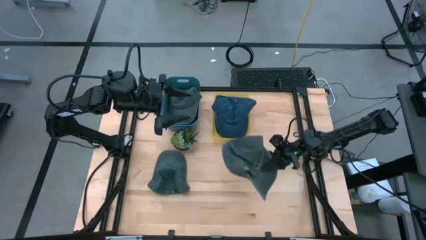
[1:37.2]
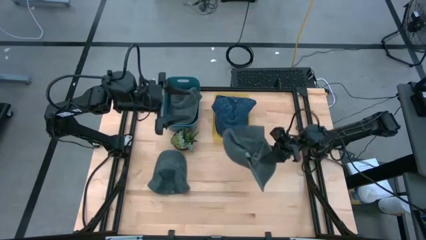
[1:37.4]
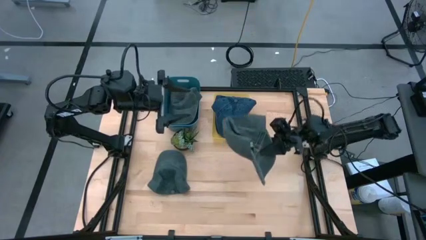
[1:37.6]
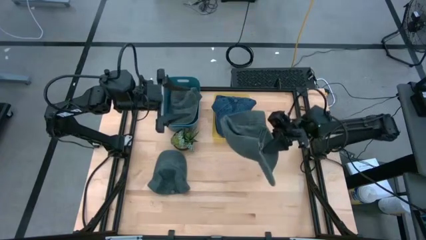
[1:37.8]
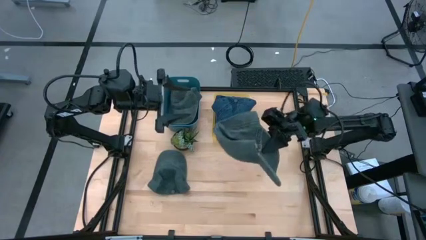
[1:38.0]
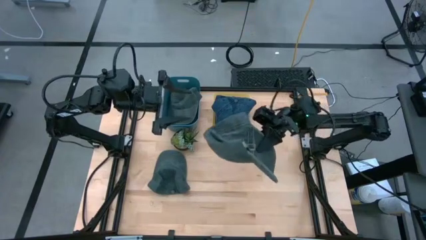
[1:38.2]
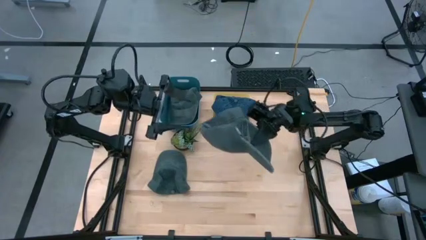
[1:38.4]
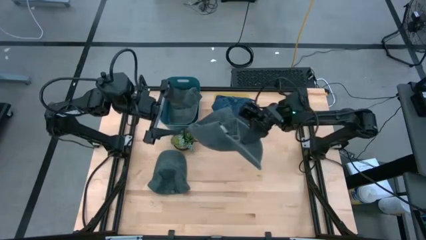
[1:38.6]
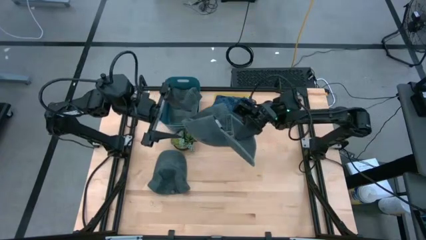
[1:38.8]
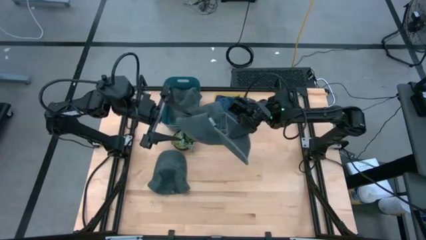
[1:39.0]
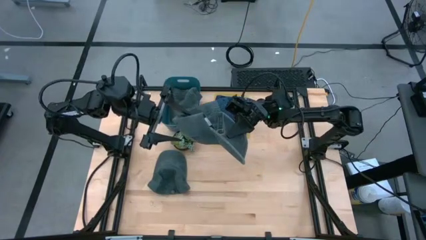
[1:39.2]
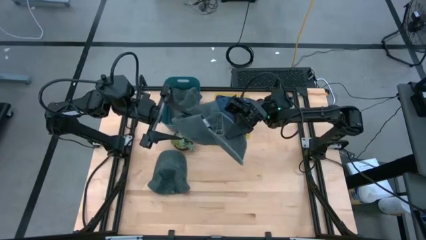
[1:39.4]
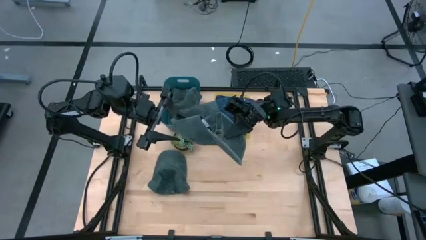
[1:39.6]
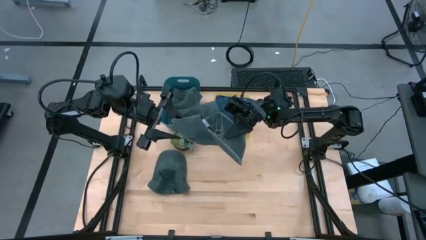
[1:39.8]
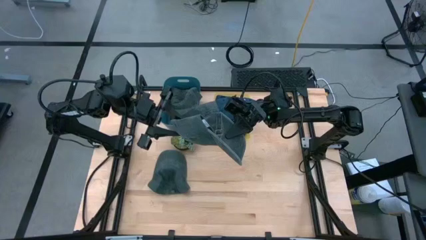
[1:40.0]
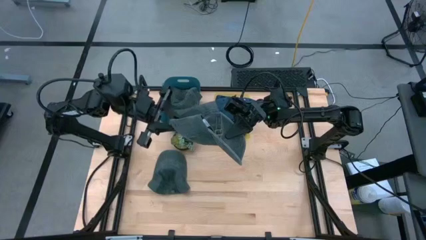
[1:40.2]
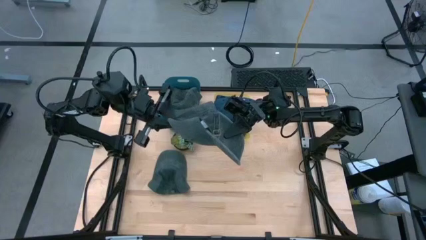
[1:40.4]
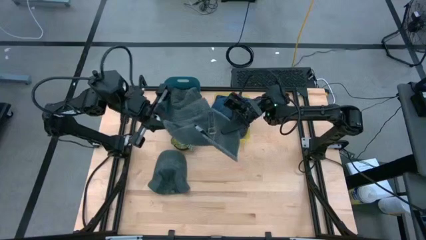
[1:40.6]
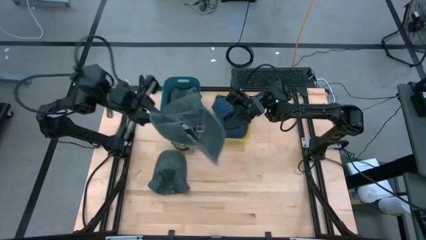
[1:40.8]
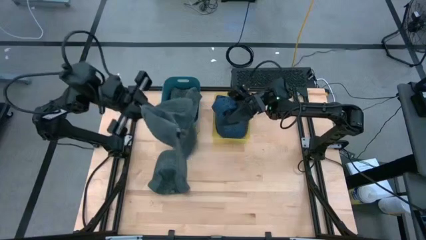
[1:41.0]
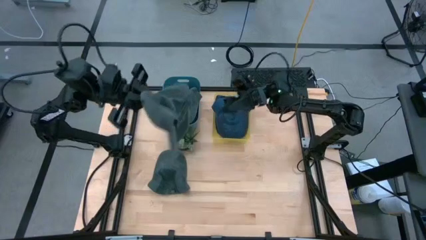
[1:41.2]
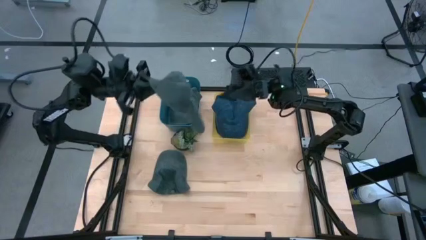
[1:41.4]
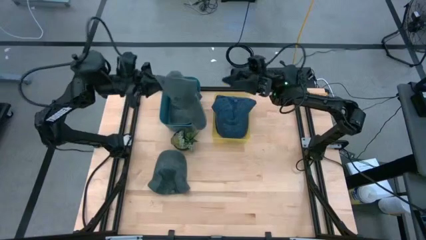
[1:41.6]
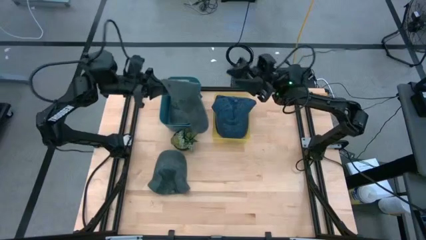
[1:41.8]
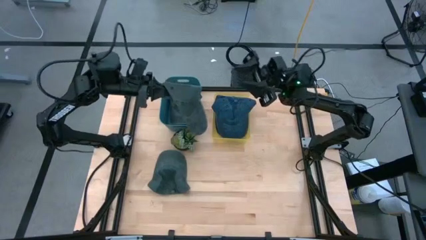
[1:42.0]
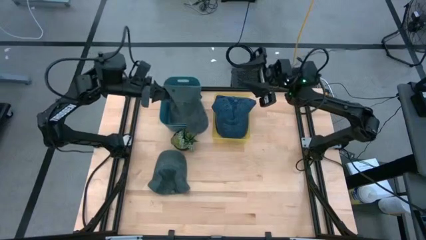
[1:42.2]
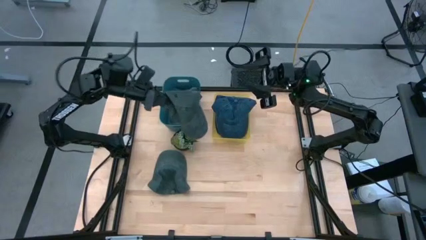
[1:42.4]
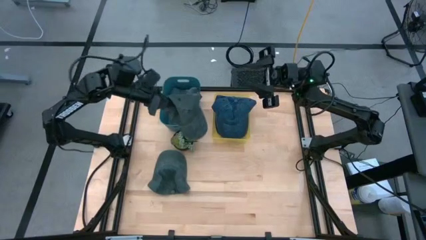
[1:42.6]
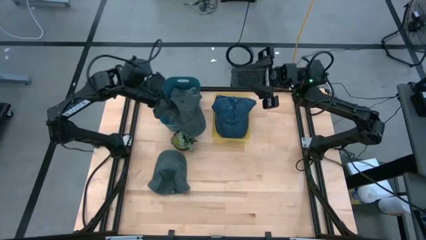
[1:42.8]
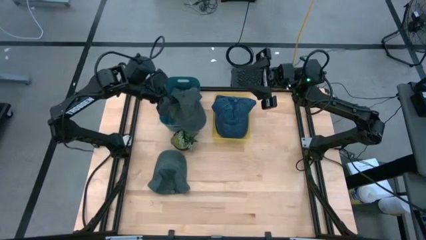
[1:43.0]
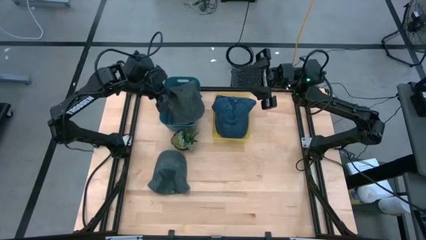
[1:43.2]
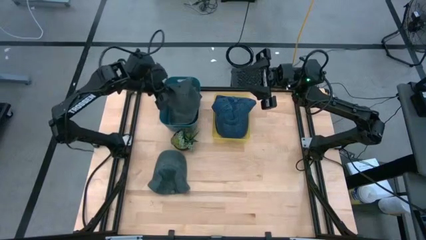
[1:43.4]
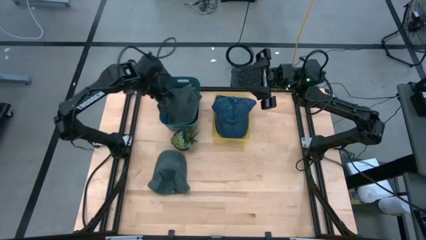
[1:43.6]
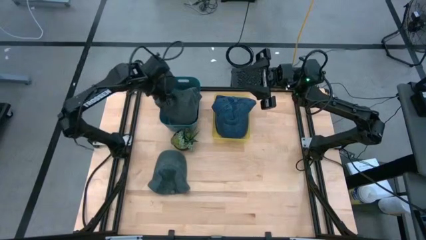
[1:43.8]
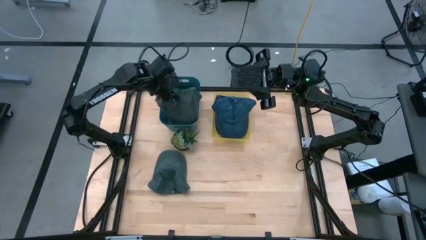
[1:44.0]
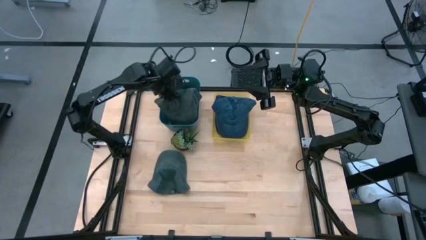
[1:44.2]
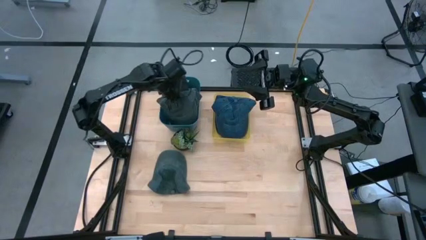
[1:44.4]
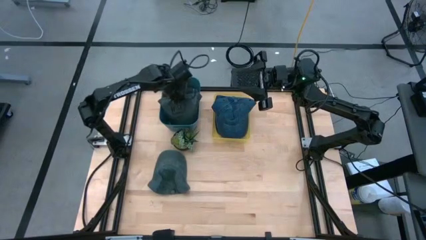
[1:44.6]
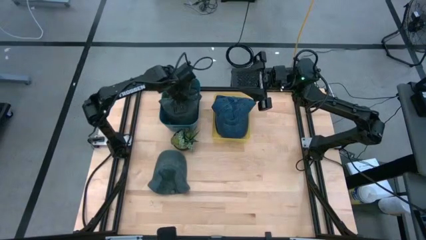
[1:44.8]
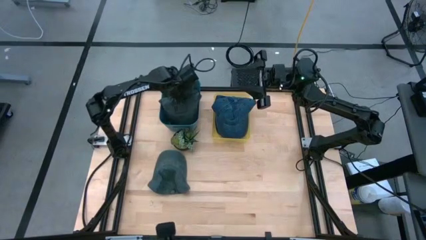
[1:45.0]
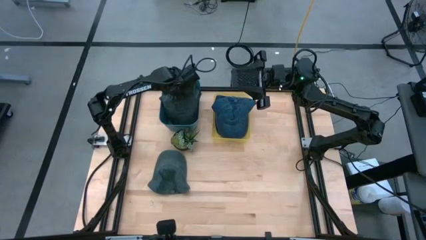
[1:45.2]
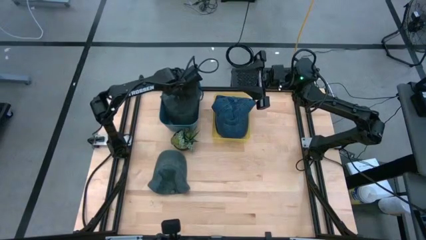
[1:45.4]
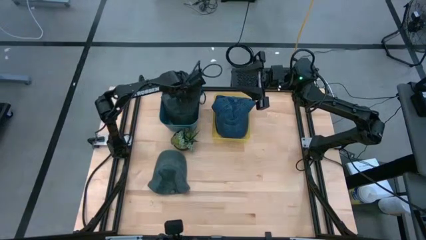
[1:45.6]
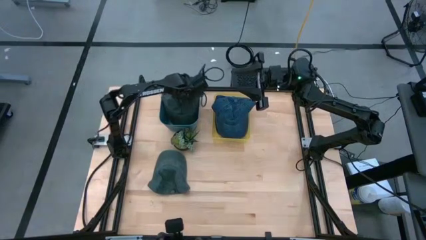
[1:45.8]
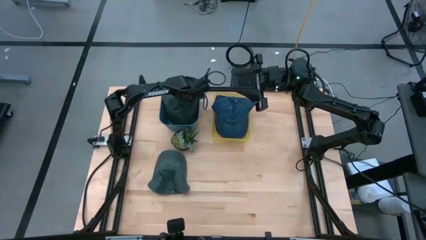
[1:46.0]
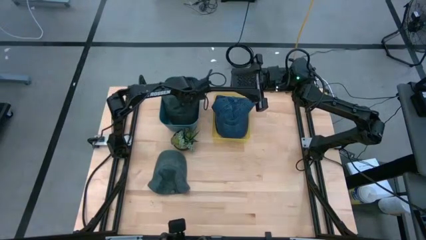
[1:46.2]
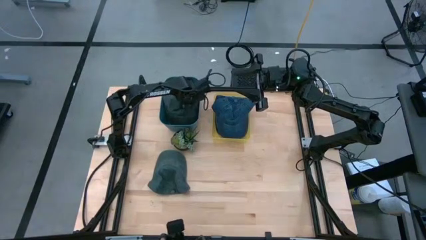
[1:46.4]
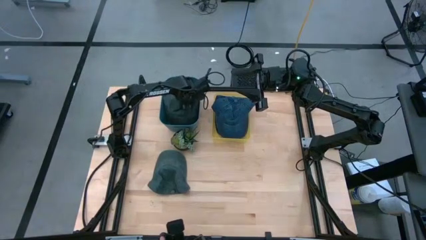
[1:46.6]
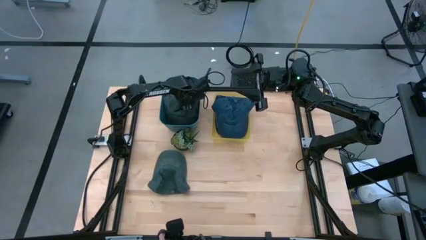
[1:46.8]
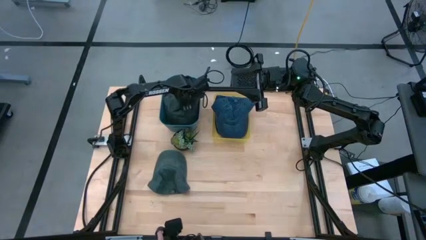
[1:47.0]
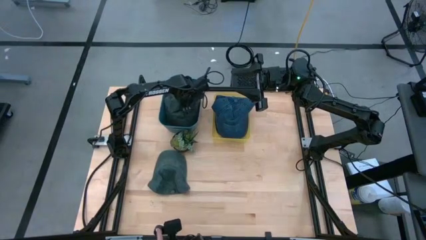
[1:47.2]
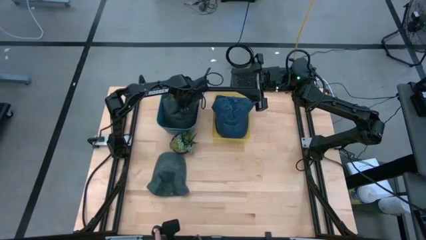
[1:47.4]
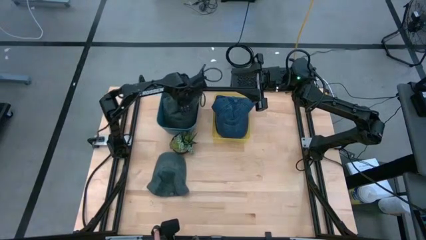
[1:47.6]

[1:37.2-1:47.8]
Task: Pick & Place hat
Put the bottom black cap into the blue bin

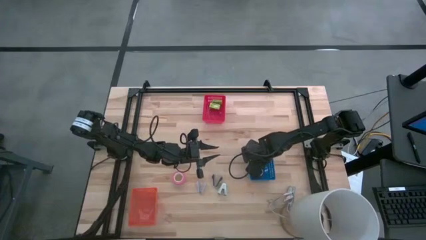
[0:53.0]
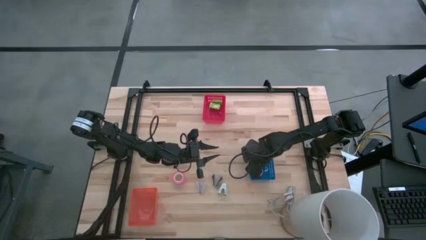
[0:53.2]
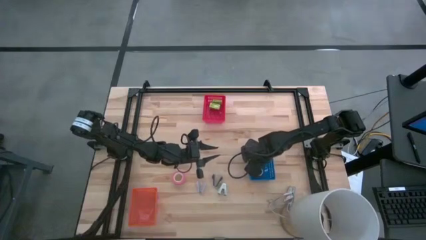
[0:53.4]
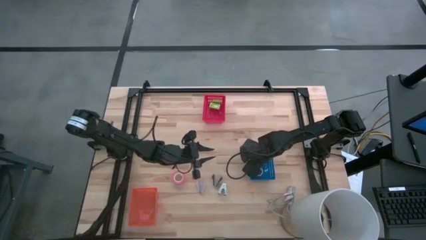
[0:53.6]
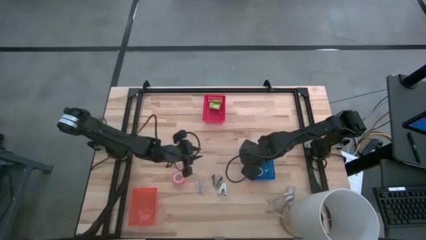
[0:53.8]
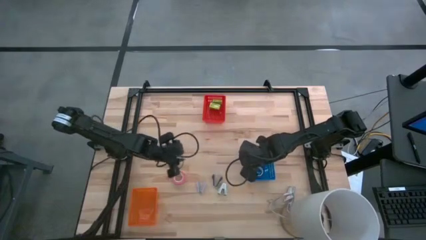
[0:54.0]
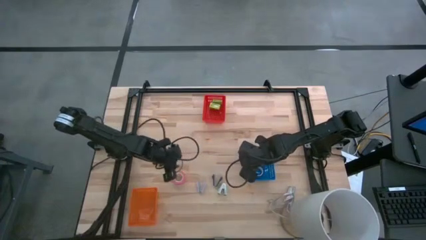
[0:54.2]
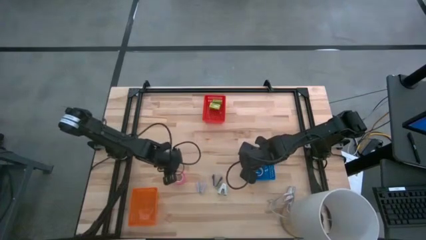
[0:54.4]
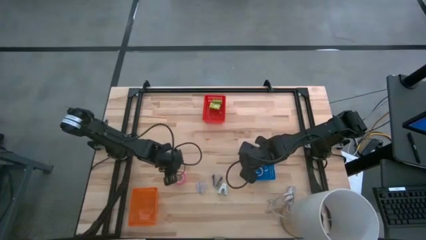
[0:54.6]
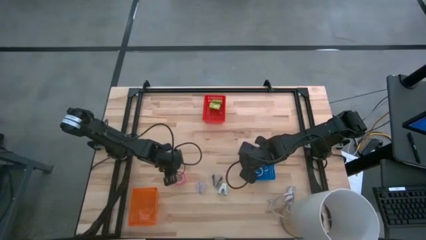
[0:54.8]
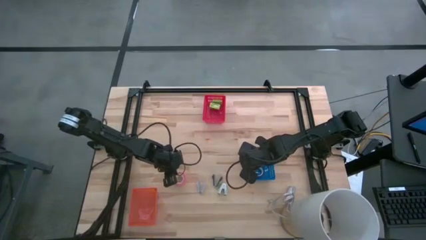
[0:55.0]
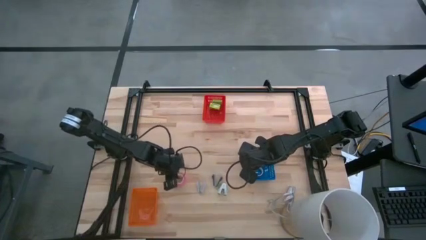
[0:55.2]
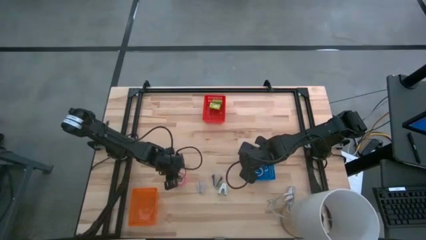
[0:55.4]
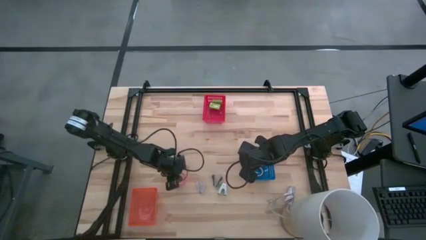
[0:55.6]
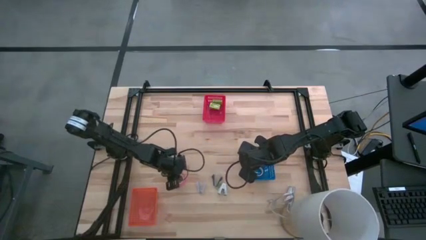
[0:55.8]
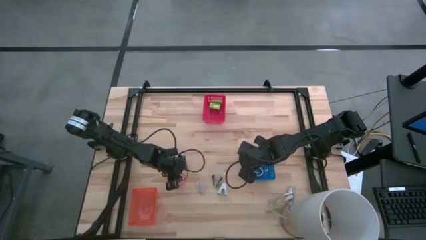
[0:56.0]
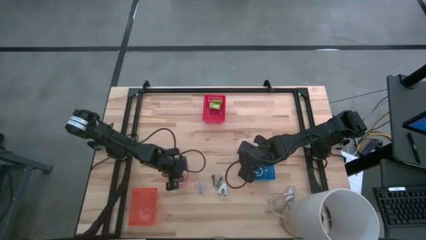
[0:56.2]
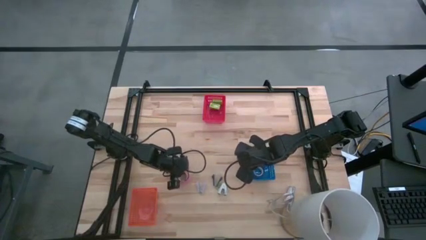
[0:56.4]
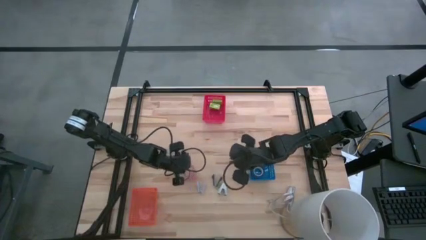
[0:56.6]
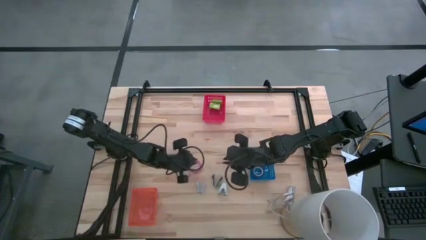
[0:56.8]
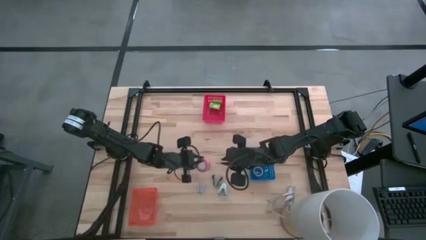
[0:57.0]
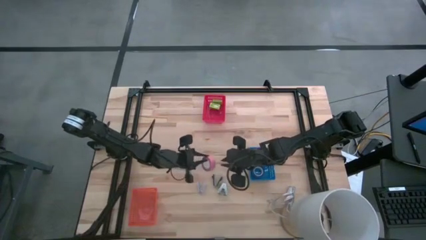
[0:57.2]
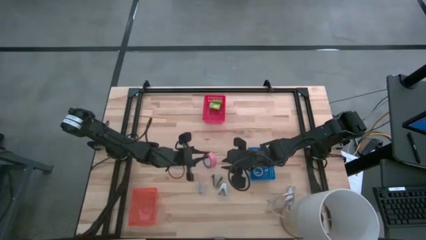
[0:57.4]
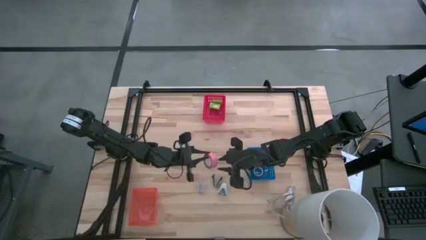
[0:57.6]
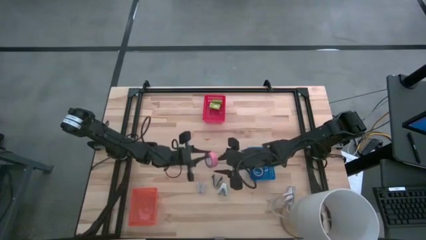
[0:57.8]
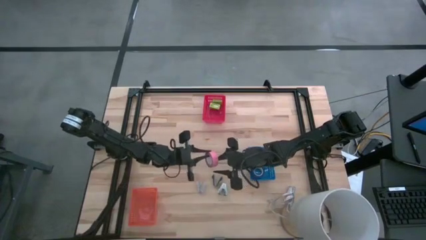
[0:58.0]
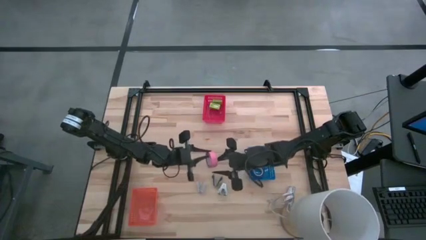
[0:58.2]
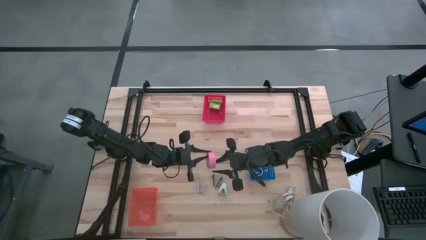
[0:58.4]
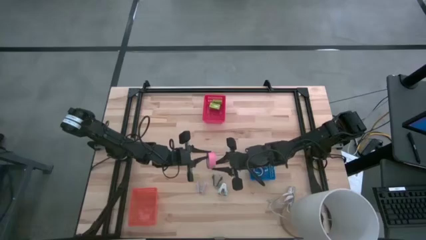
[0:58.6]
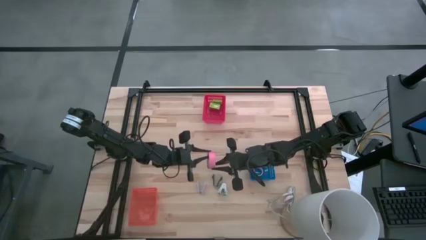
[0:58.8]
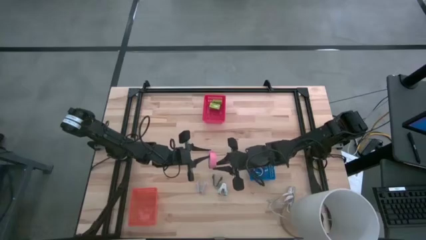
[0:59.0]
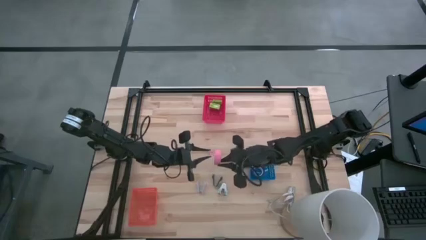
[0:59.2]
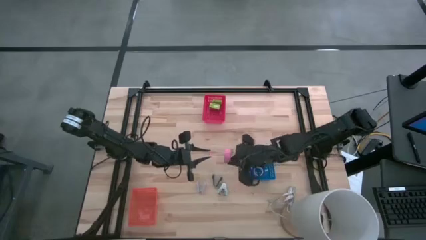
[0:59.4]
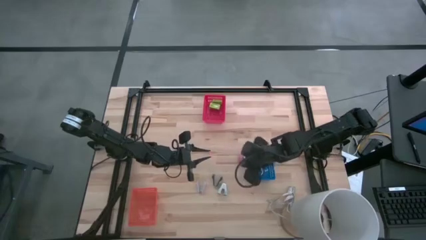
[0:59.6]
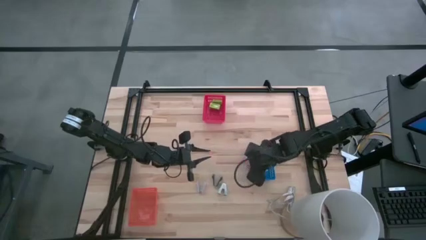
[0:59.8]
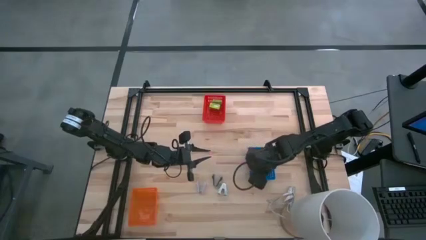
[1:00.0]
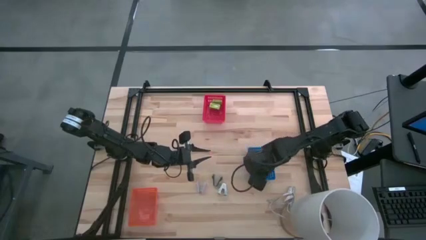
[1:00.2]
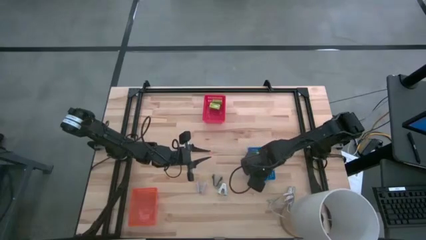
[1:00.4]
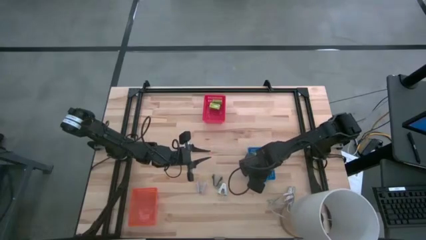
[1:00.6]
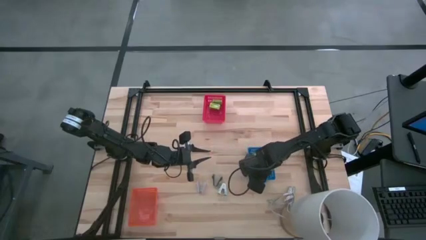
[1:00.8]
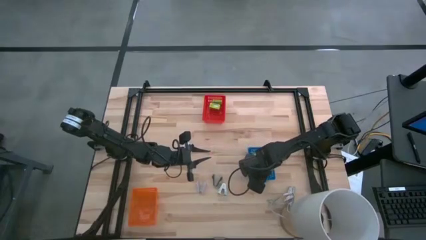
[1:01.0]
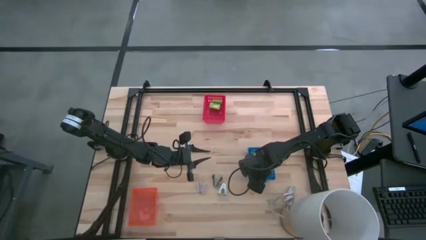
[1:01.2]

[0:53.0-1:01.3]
Task: Pick and place Stapler, Stapler remover, tape
Put the pink tape into the blue bin
